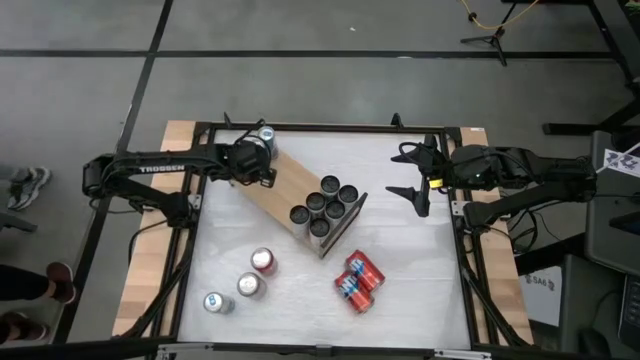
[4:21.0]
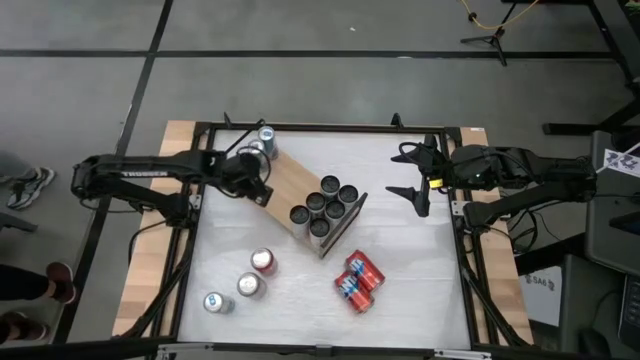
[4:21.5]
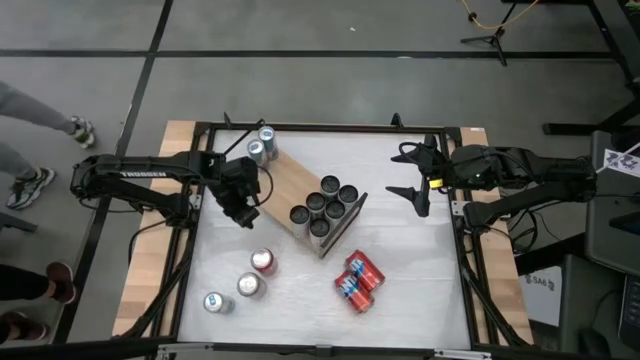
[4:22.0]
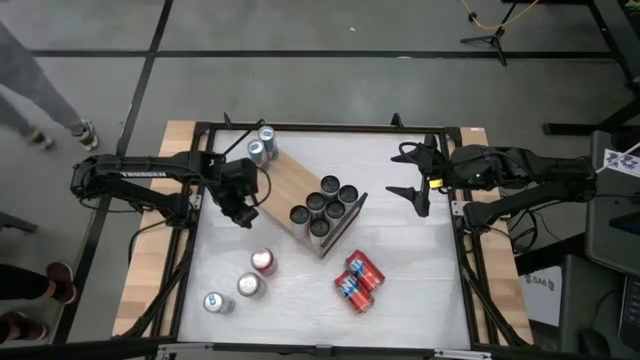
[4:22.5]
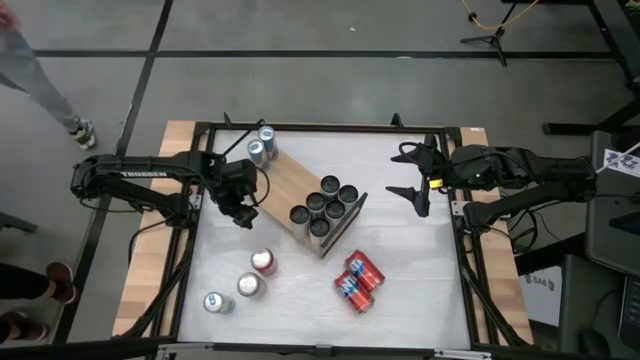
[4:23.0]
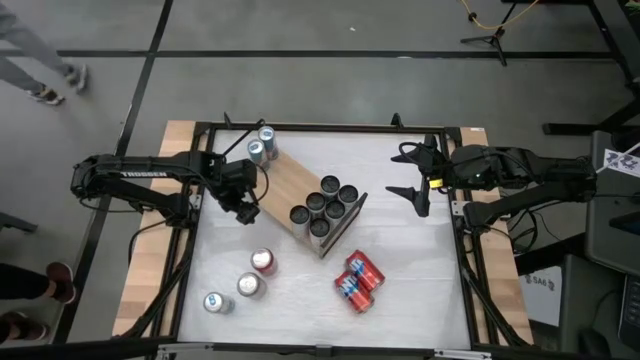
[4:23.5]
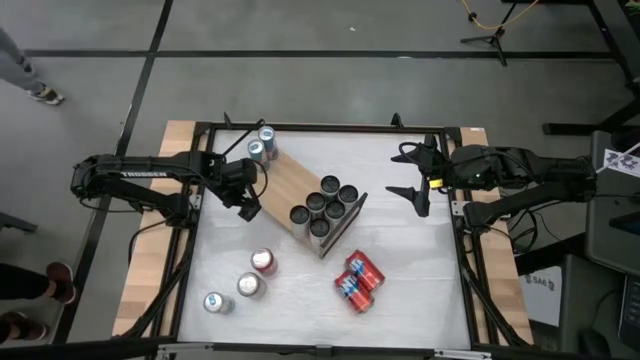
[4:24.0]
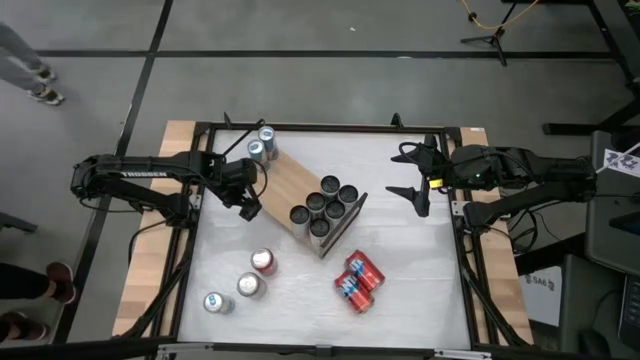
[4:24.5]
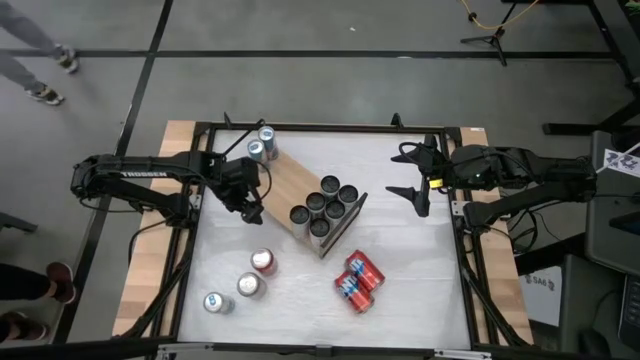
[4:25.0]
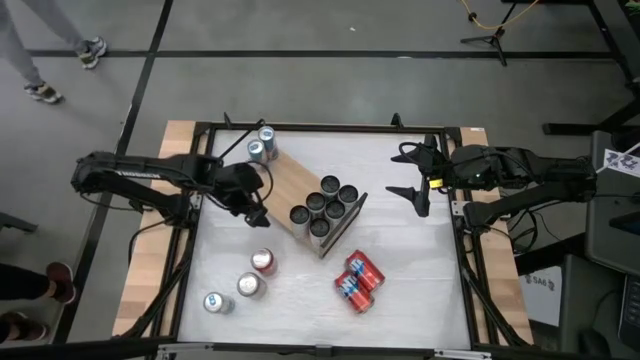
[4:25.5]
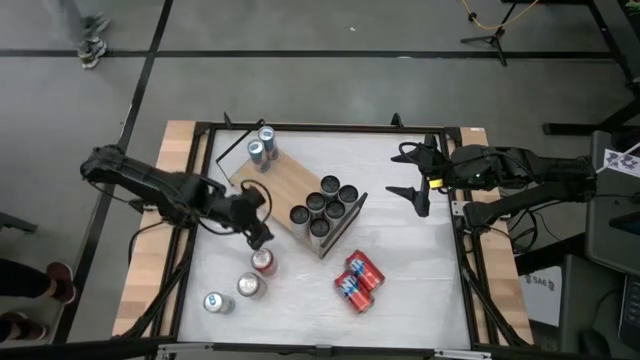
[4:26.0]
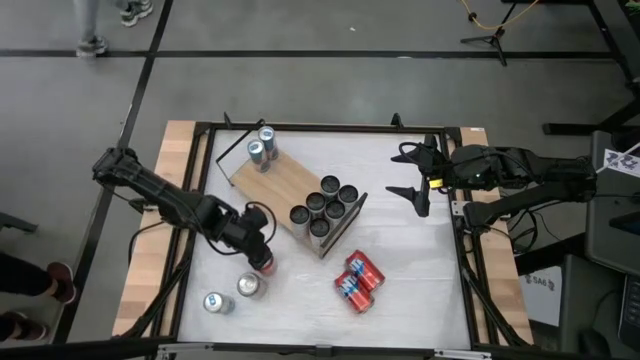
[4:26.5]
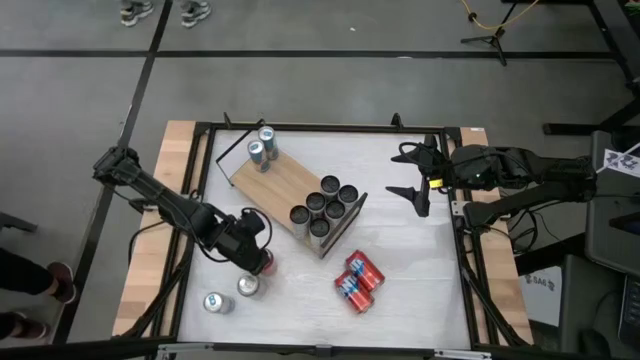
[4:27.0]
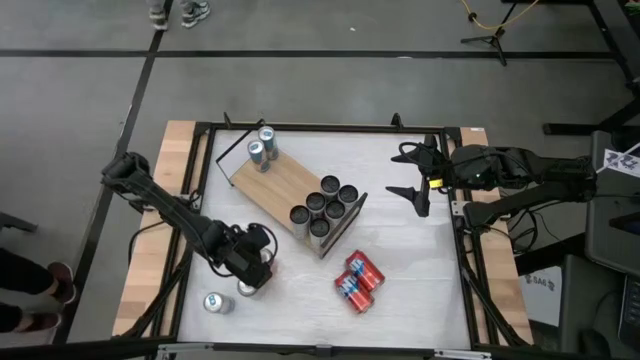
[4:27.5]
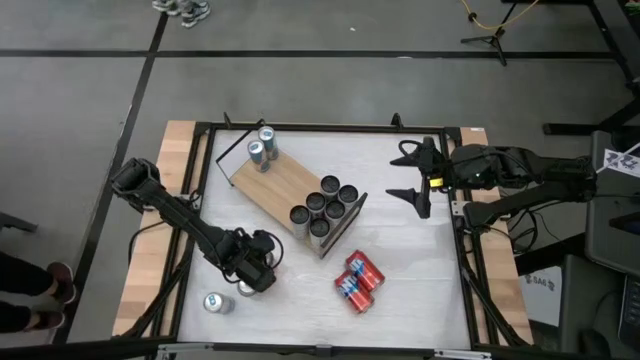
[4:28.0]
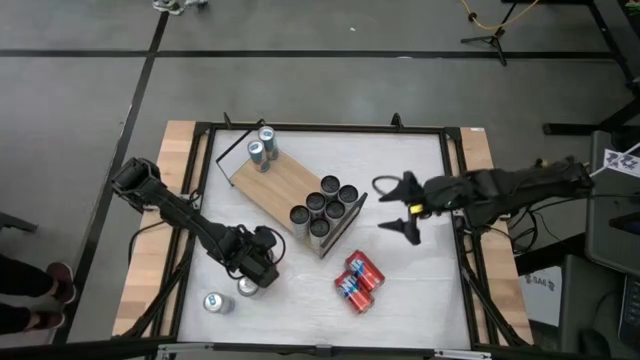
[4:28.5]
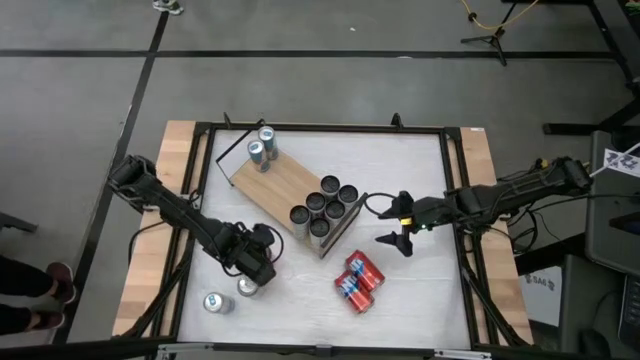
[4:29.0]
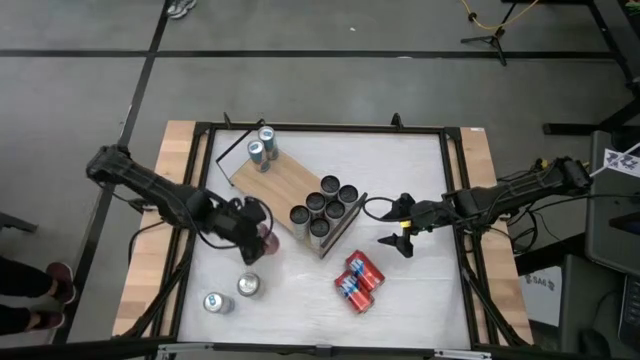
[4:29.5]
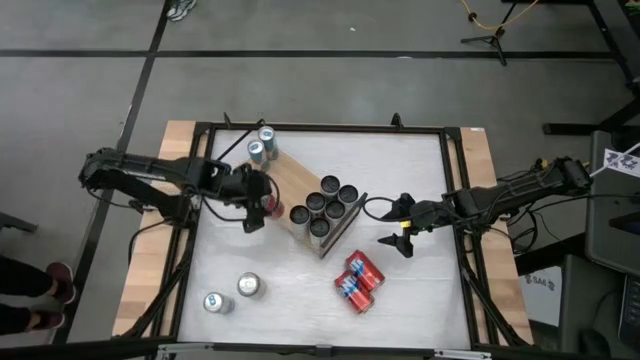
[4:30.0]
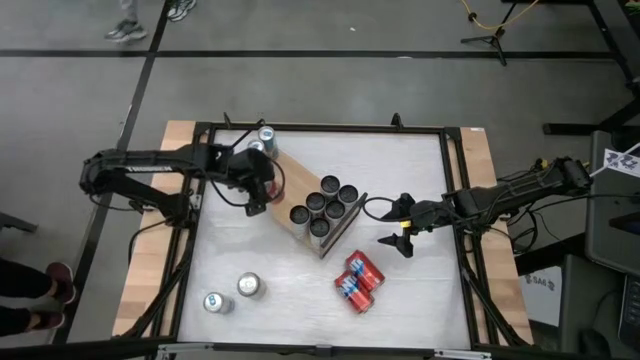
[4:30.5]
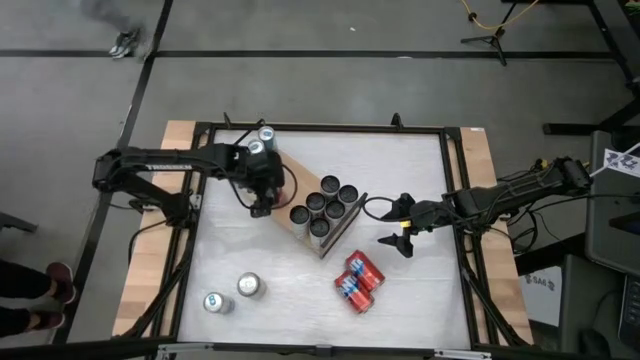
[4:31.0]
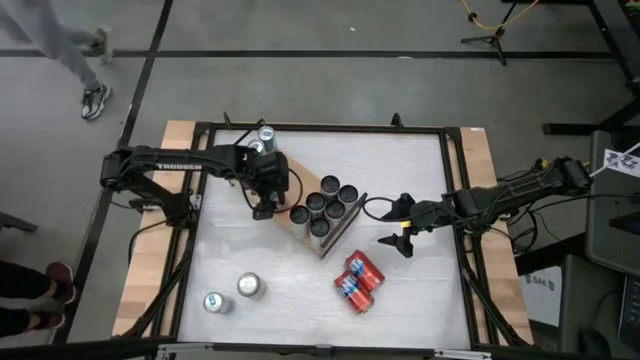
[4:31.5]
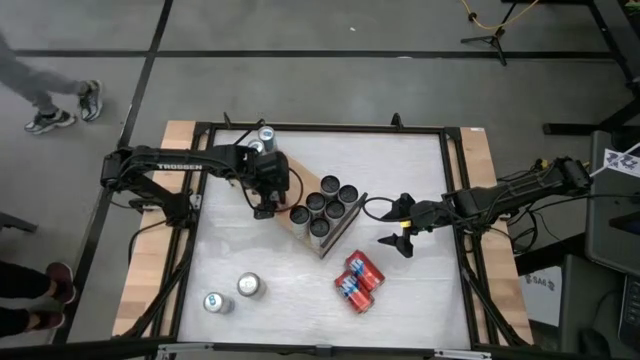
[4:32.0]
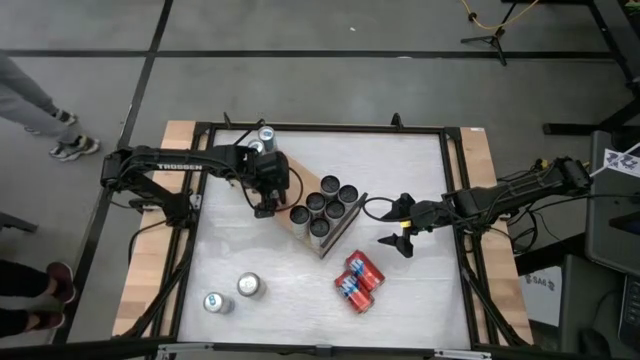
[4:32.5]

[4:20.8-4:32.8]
Task: Place canned beverage on shelf
Put the left red soda can on the shelf

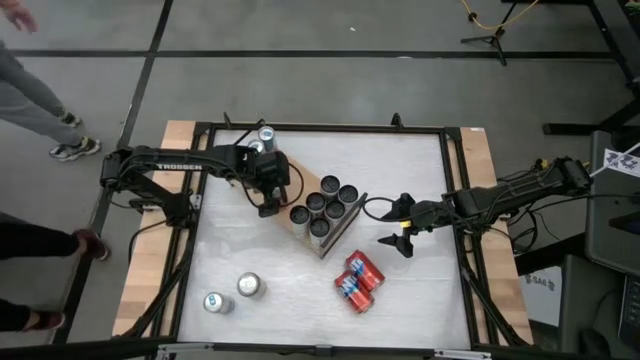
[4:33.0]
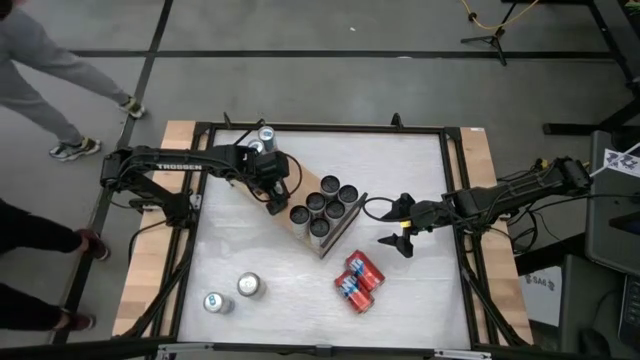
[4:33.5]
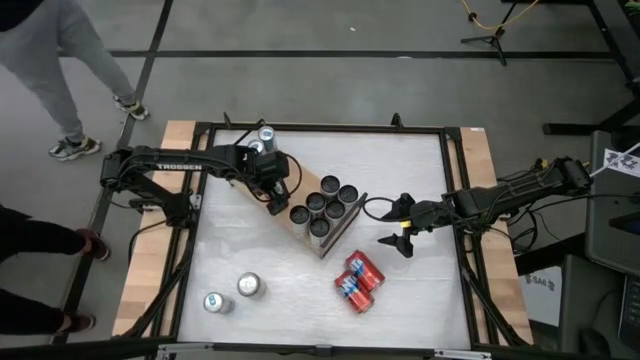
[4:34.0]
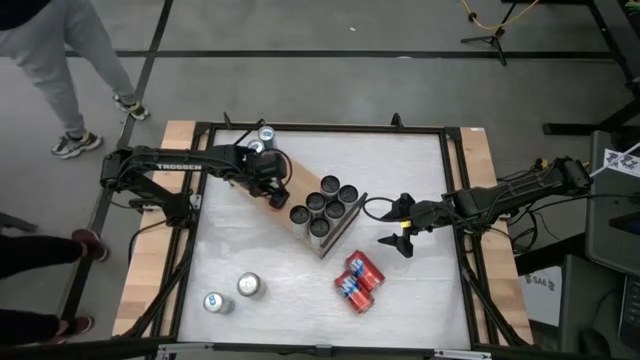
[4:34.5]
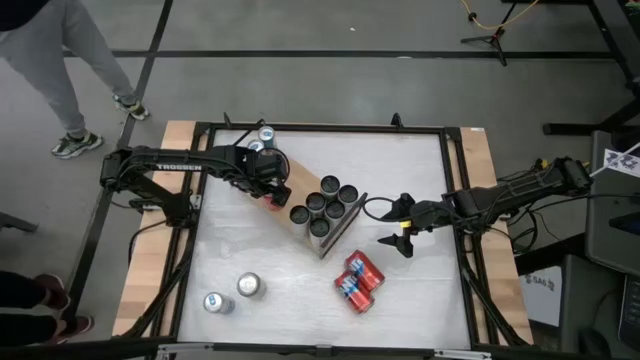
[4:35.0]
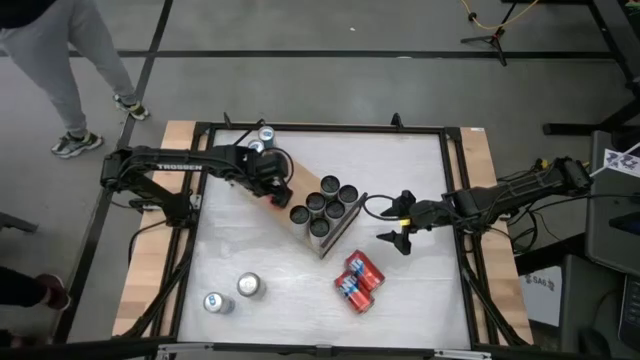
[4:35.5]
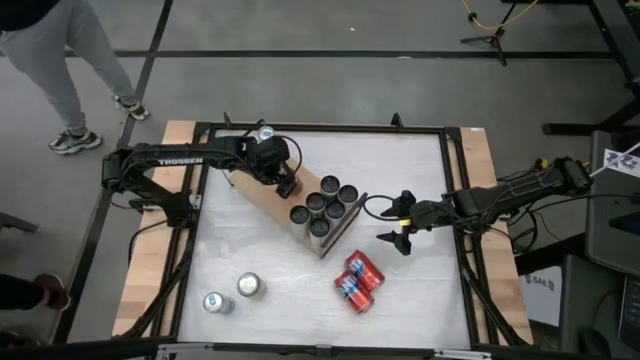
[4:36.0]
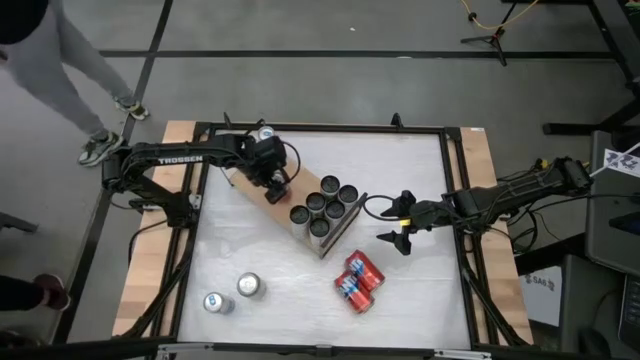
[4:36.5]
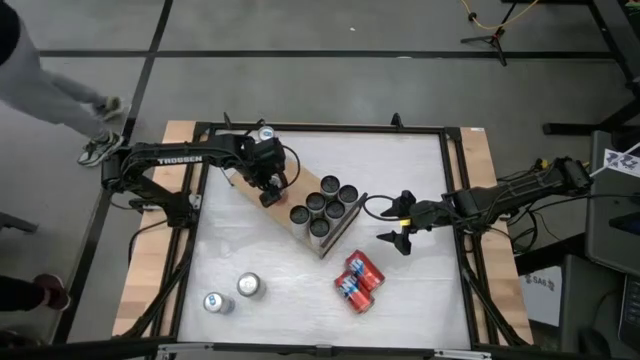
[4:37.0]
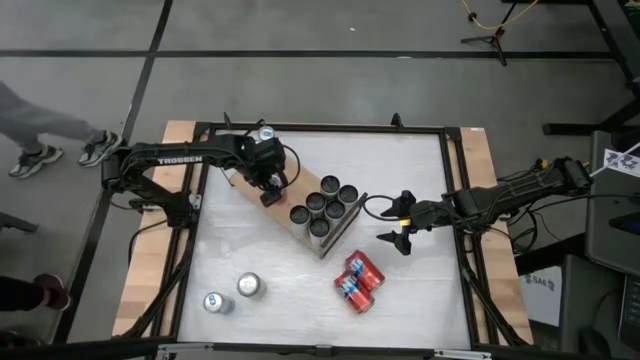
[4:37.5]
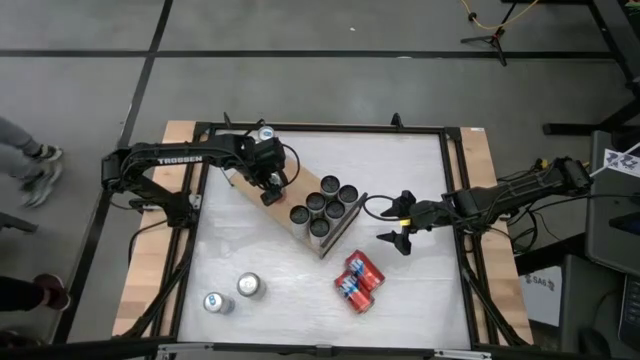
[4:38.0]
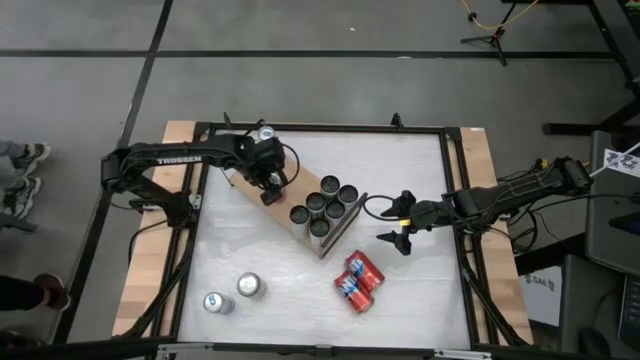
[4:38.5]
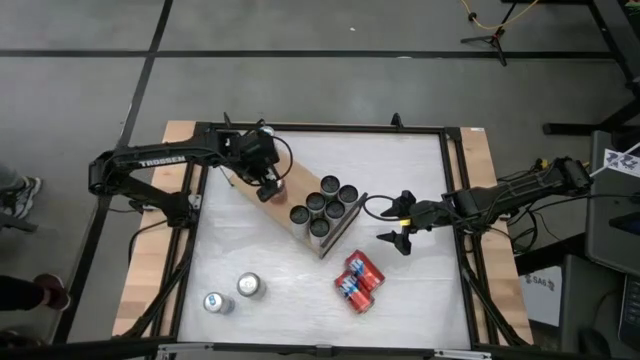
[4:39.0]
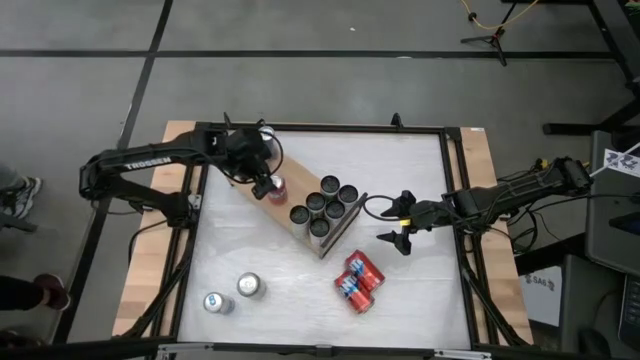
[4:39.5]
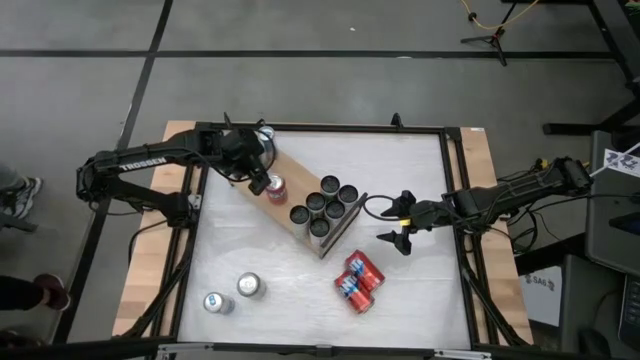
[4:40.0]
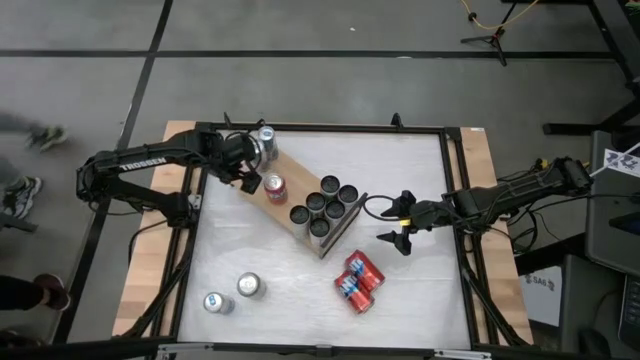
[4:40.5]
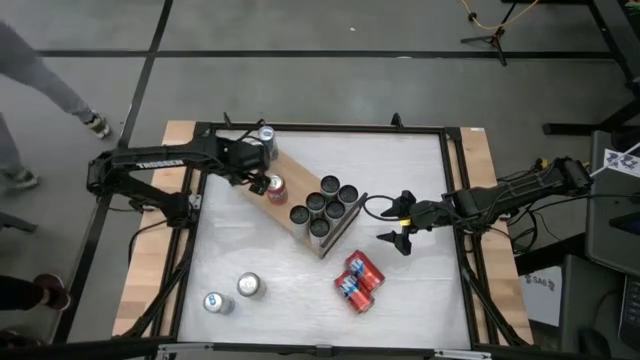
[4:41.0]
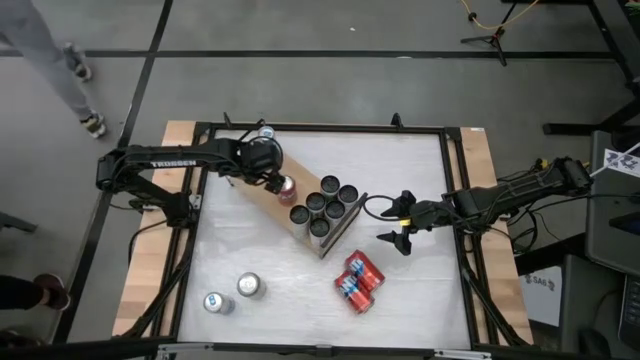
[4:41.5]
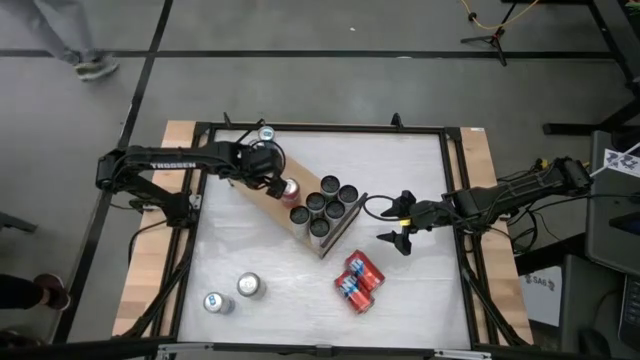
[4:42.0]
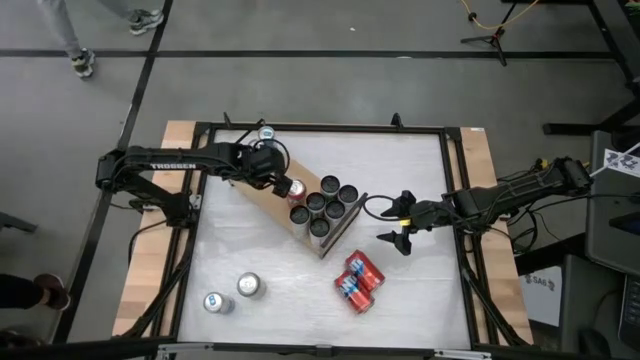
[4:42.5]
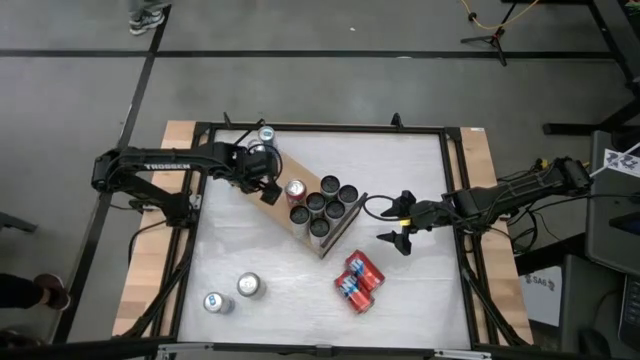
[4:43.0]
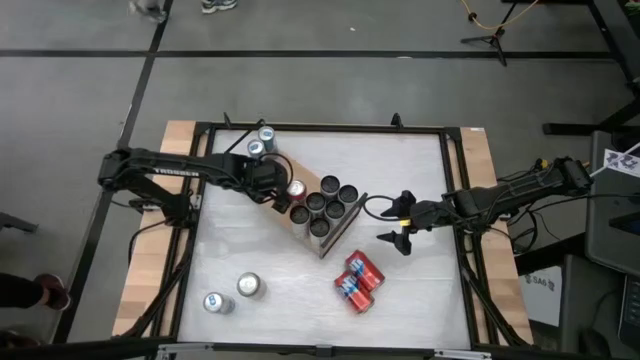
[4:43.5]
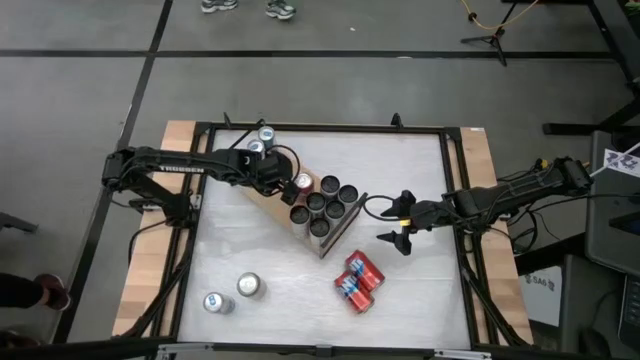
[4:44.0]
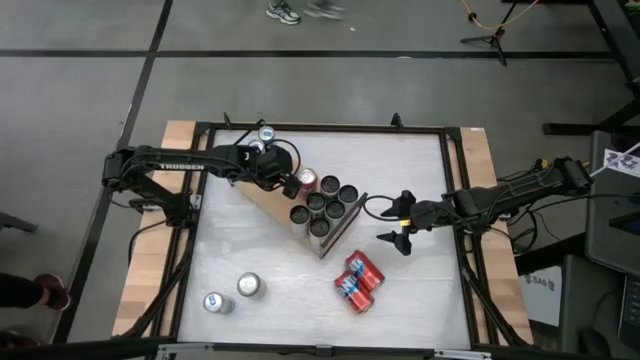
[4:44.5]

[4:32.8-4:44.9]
Put the left red soda can on the shelf
